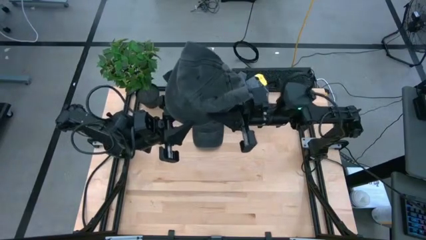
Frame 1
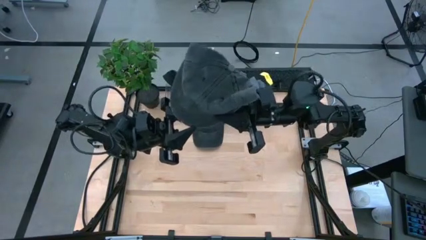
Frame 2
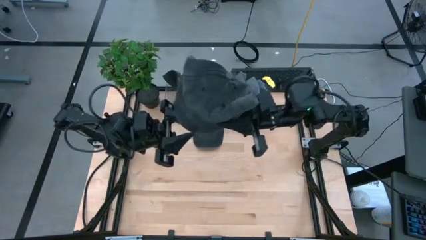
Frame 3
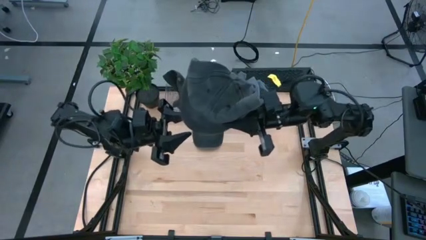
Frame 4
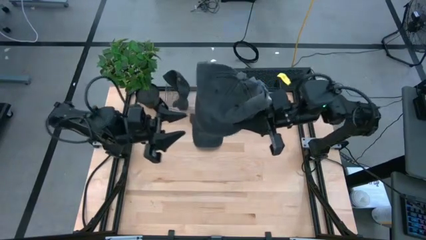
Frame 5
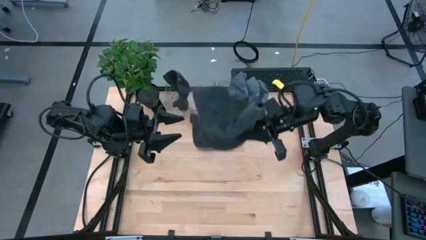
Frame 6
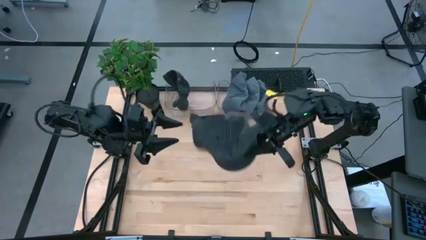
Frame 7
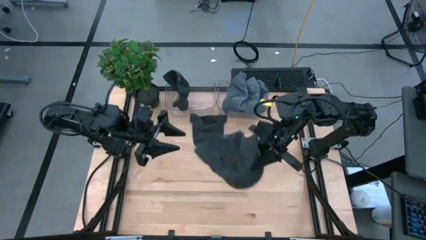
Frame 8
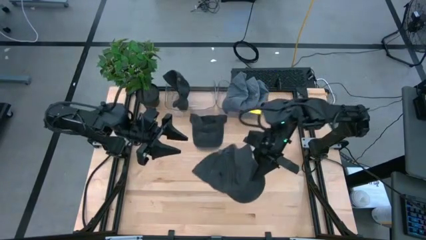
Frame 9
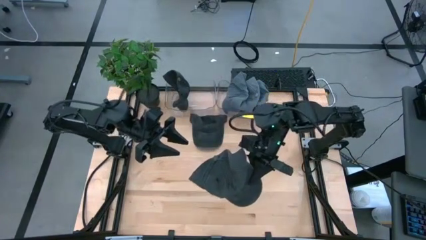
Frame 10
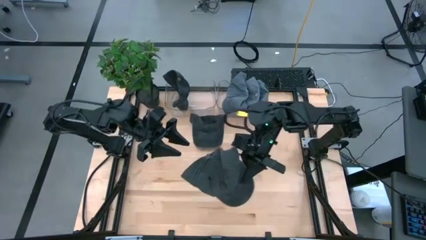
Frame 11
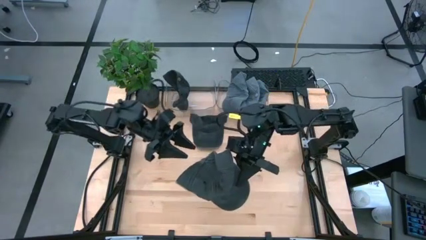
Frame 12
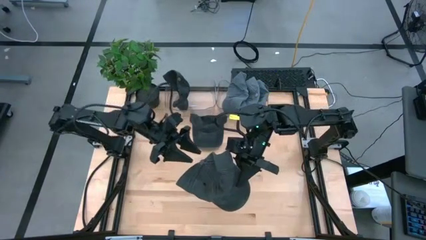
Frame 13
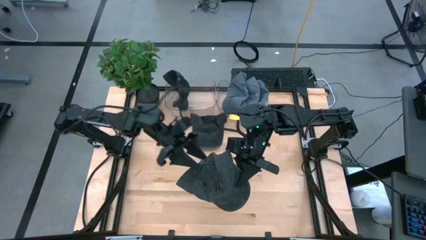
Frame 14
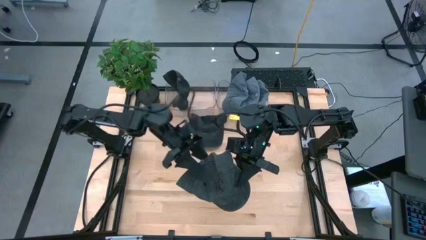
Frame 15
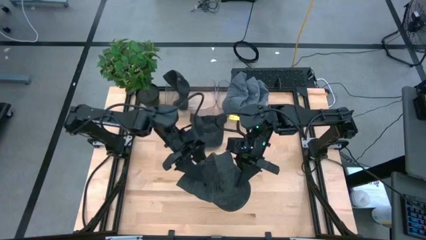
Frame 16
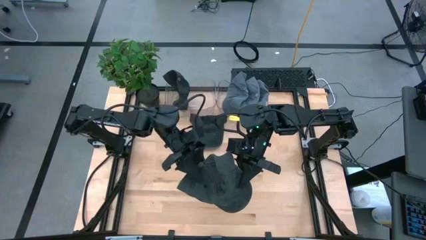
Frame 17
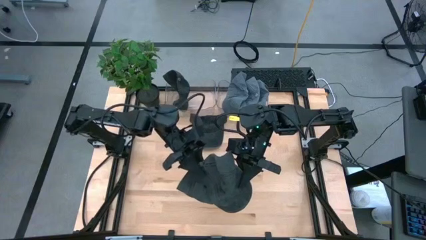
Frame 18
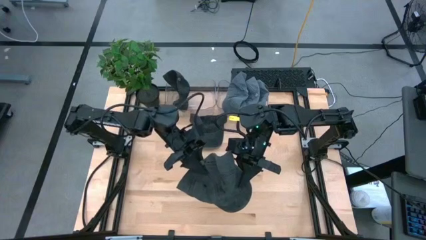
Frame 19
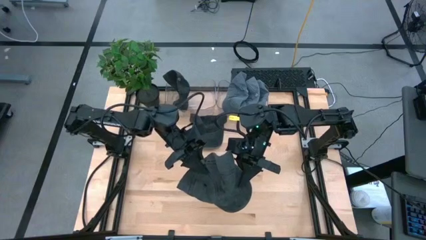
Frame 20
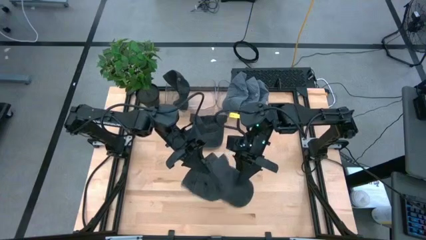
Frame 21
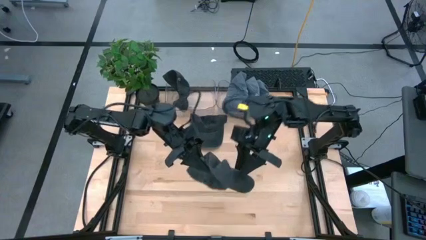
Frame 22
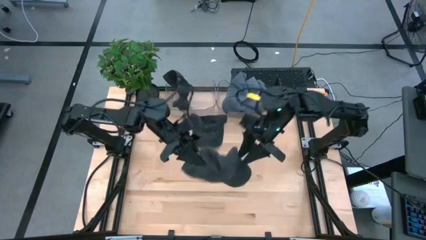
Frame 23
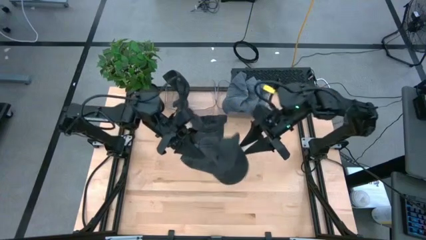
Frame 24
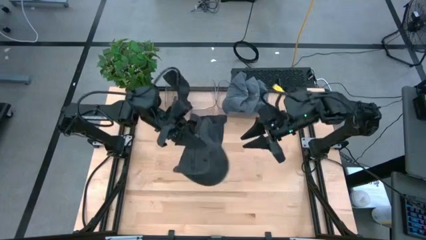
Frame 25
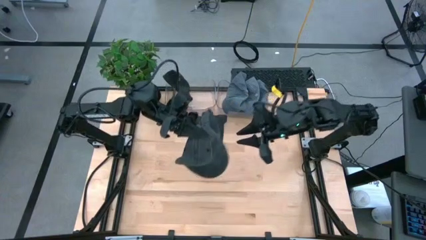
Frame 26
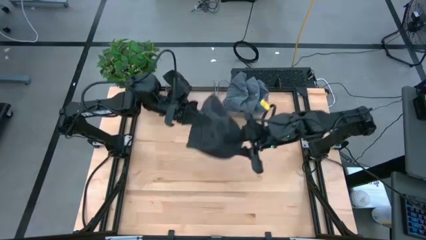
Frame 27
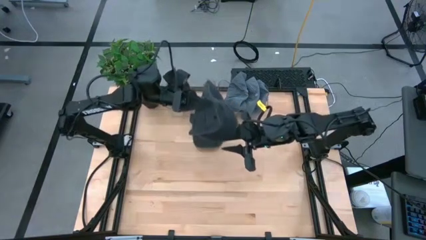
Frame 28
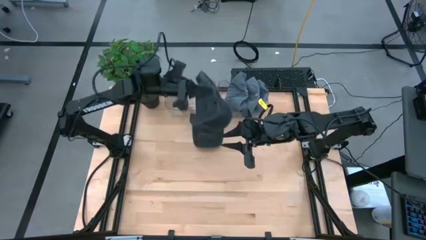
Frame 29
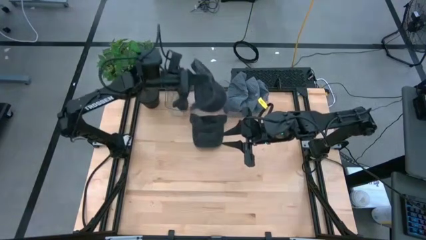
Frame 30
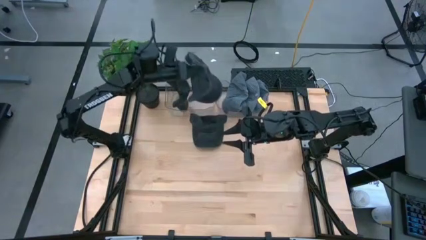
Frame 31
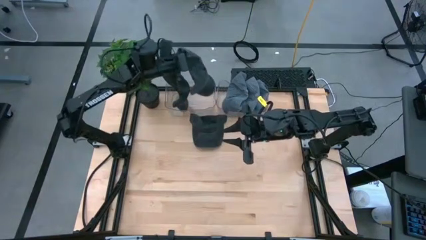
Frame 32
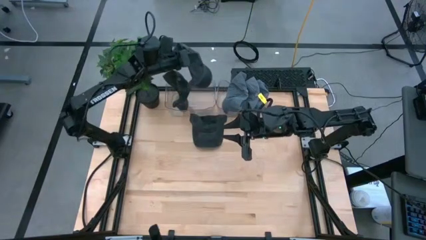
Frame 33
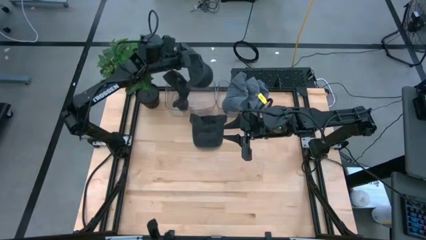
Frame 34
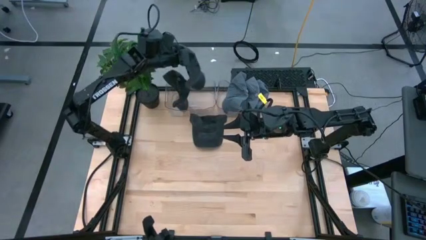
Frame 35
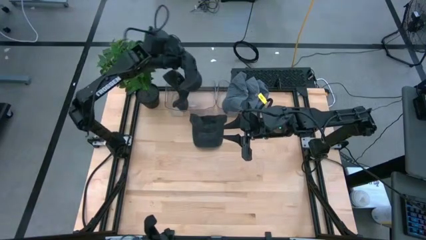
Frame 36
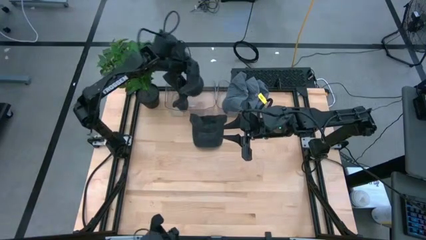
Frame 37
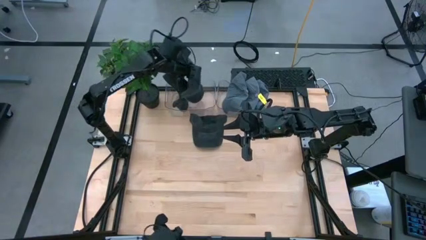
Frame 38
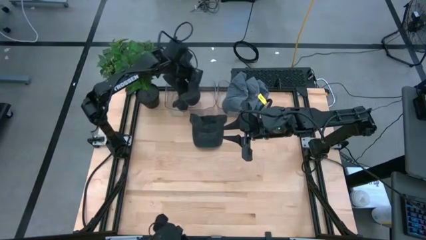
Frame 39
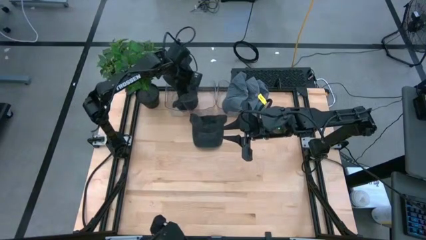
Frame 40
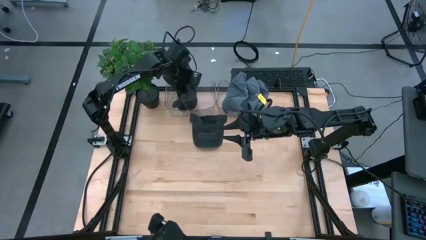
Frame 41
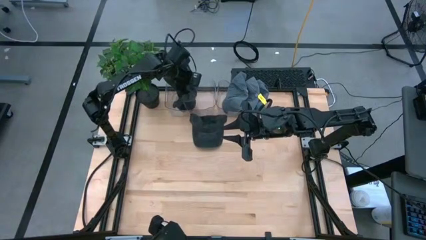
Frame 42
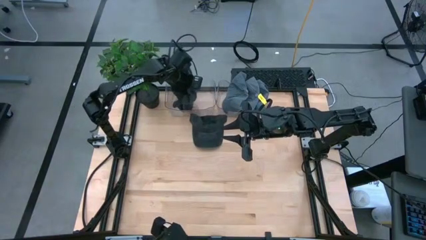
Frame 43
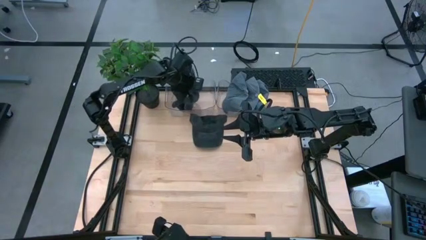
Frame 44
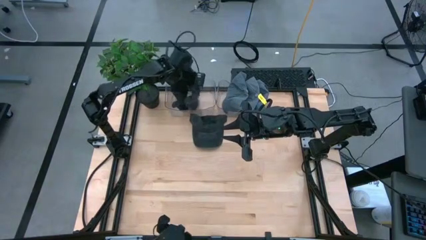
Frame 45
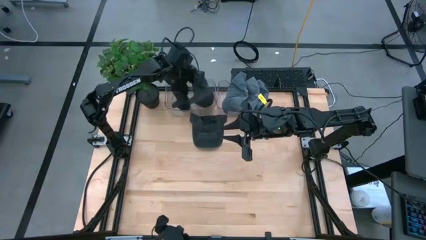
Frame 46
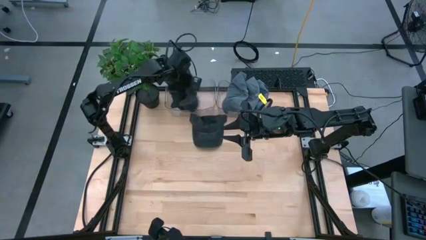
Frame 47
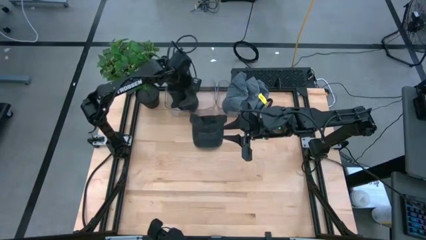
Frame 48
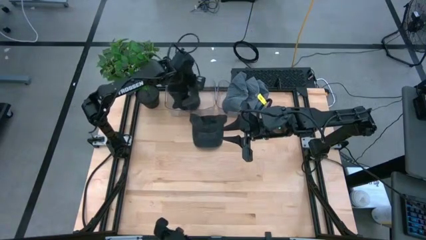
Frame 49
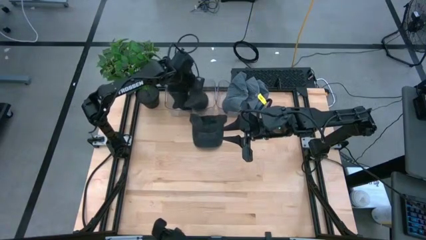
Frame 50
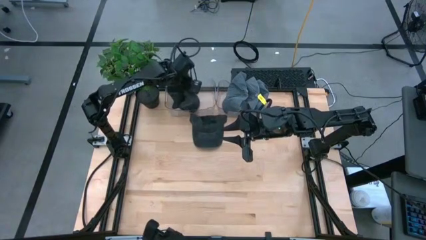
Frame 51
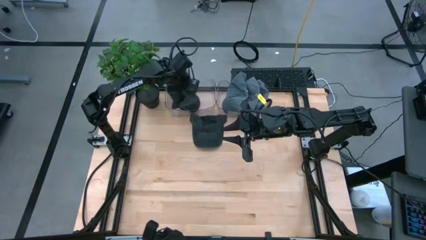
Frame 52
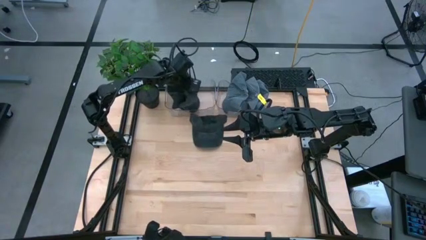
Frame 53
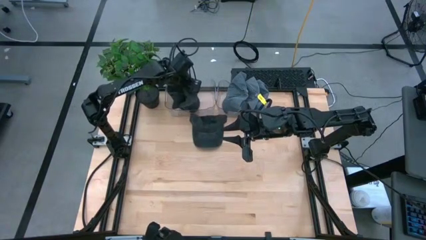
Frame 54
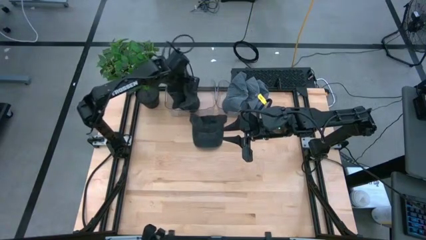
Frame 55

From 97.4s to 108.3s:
Task: Pick & Place hat
Put the bottom black cap into the left transparent bin

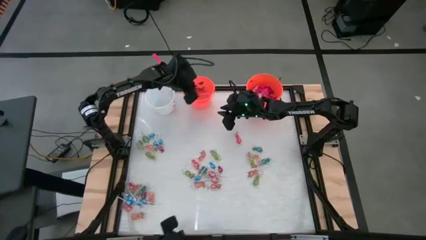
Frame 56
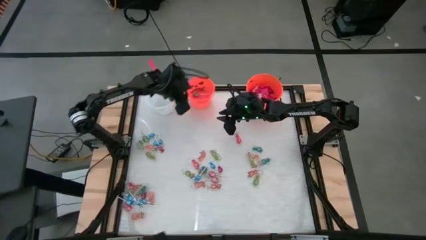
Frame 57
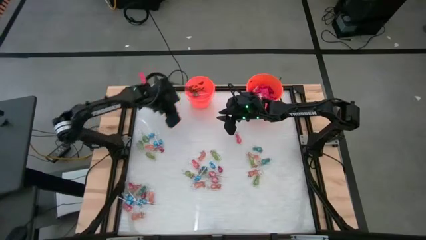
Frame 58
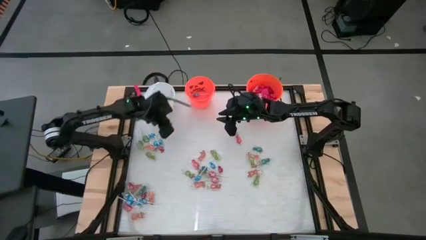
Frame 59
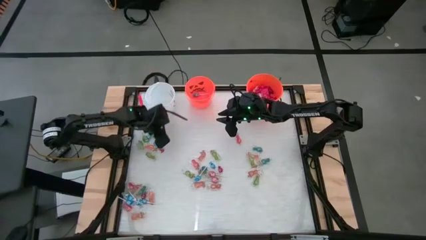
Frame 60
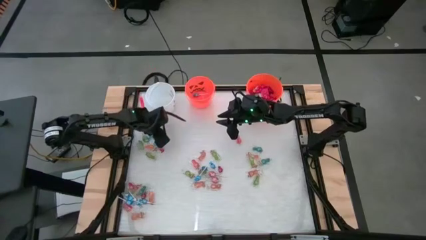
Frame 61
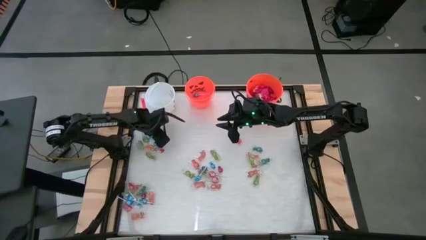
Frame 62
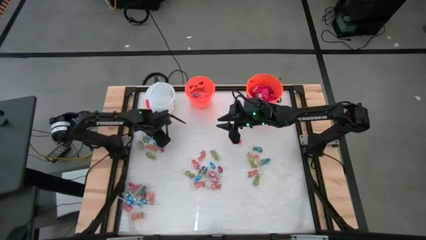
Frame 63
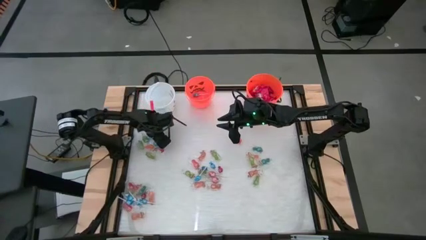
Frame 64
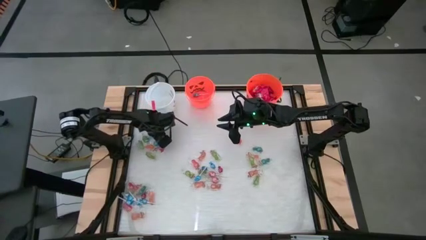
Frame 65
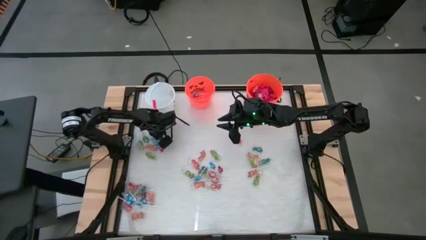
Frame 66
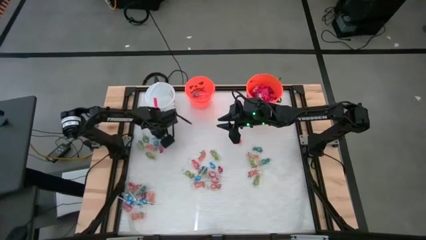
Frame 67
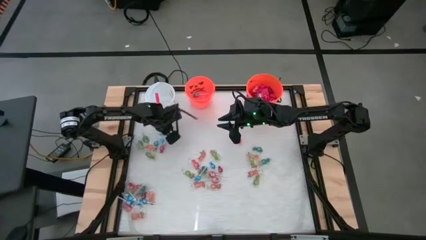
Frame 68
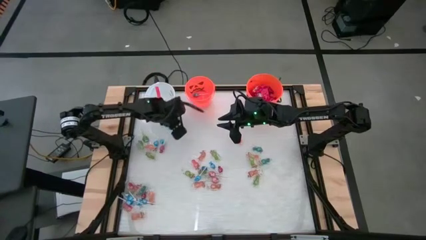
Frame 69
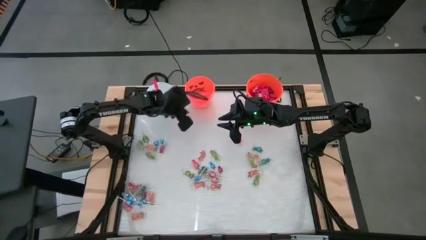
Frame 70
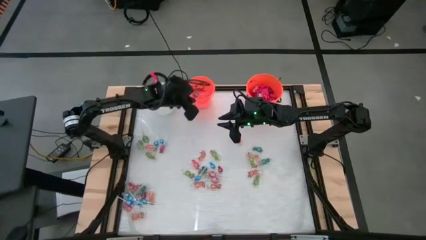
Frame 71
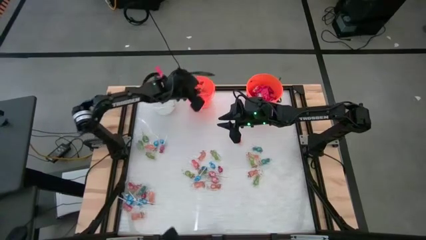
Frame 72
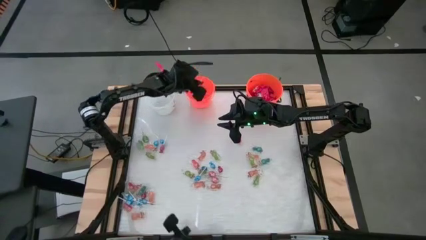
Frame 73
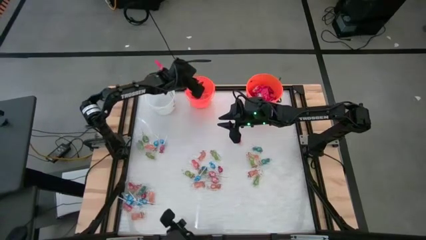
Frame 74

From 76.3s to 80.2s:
Task: Sort candy by brand, put in halloween buckets
Put the blue lollipop into the left orange bucket
